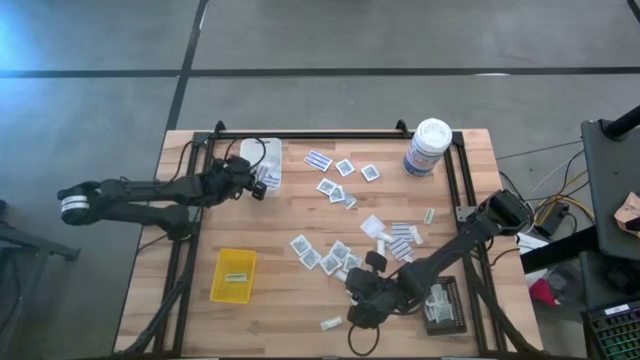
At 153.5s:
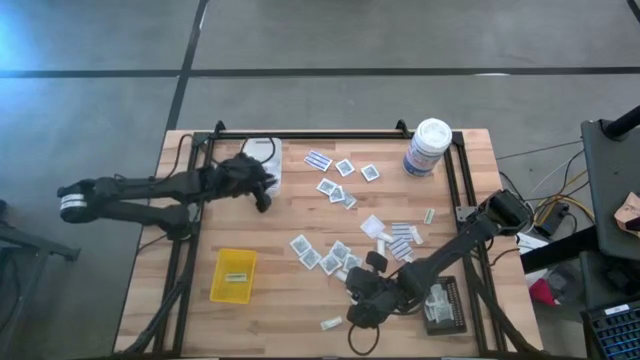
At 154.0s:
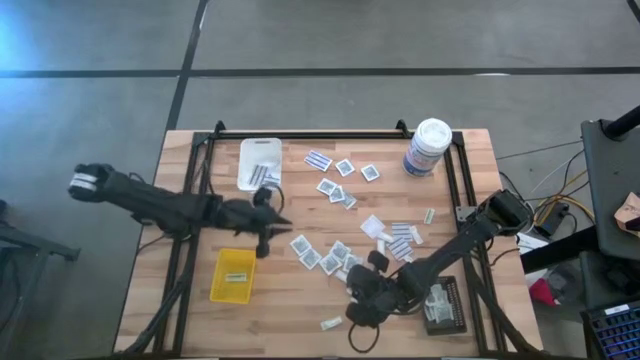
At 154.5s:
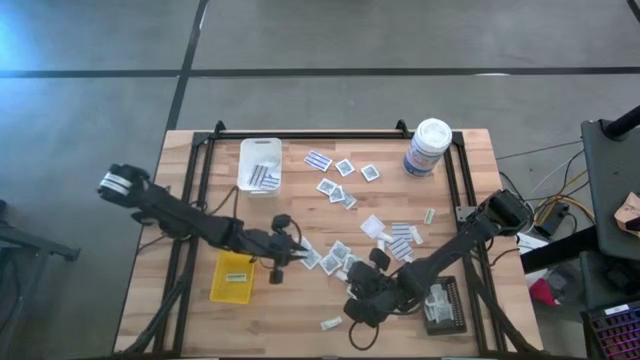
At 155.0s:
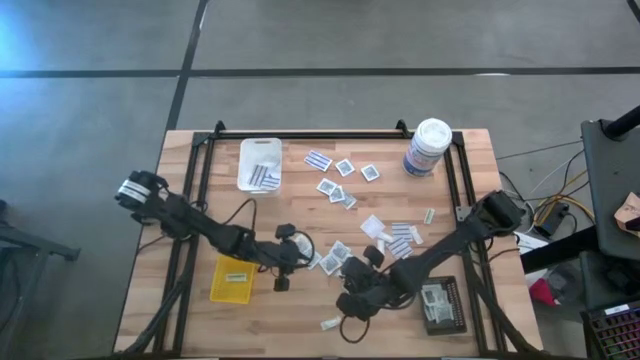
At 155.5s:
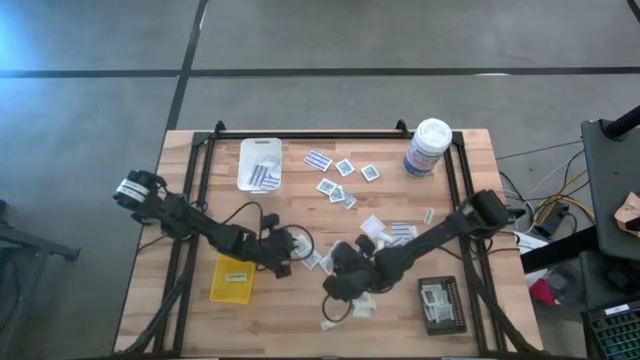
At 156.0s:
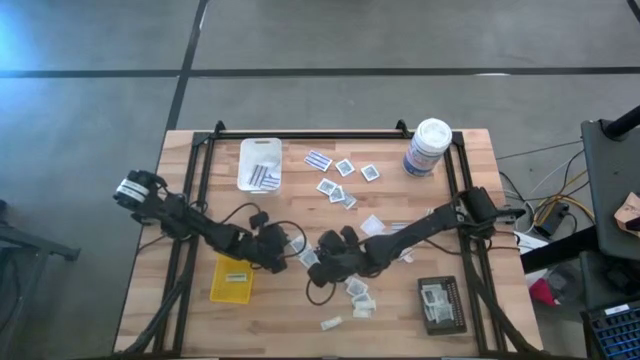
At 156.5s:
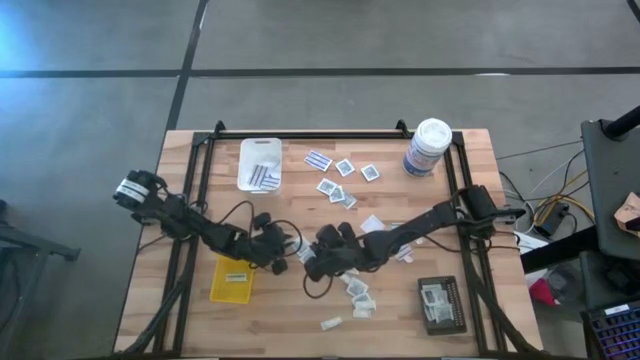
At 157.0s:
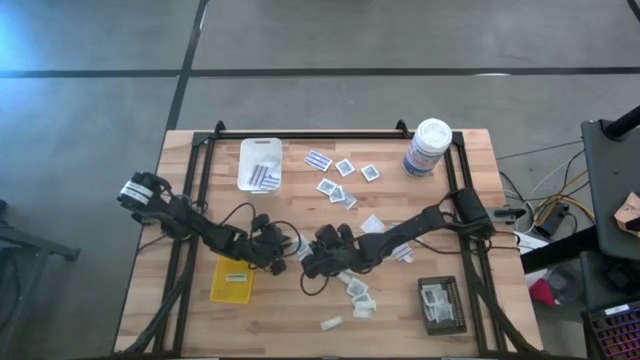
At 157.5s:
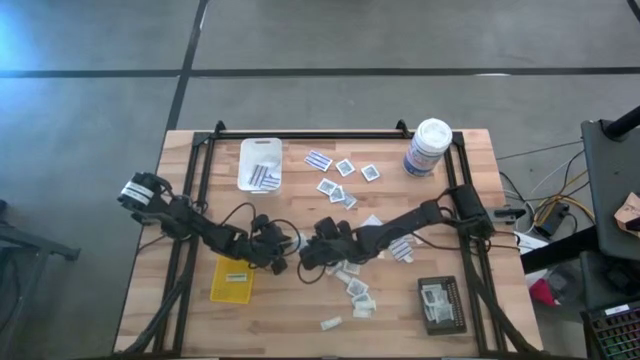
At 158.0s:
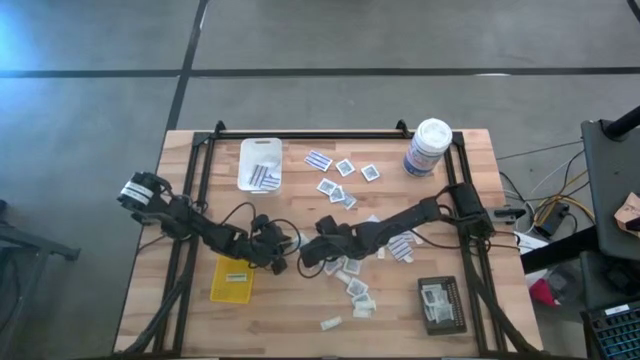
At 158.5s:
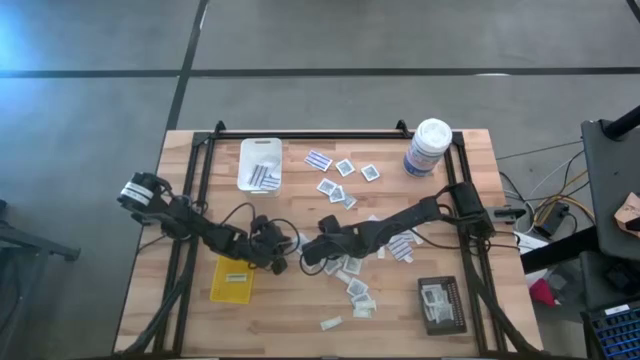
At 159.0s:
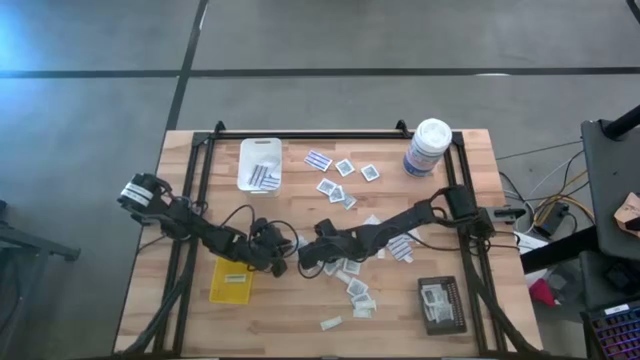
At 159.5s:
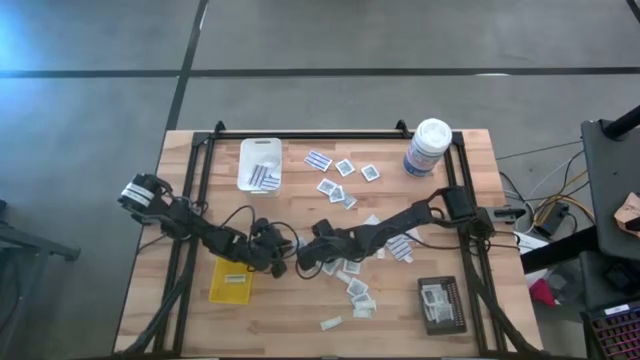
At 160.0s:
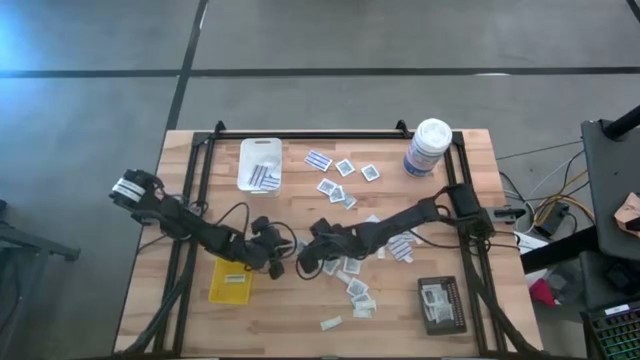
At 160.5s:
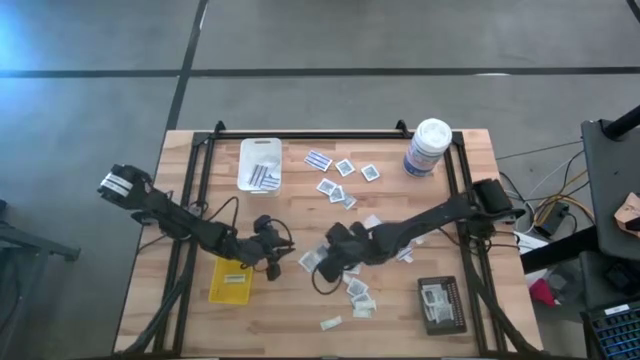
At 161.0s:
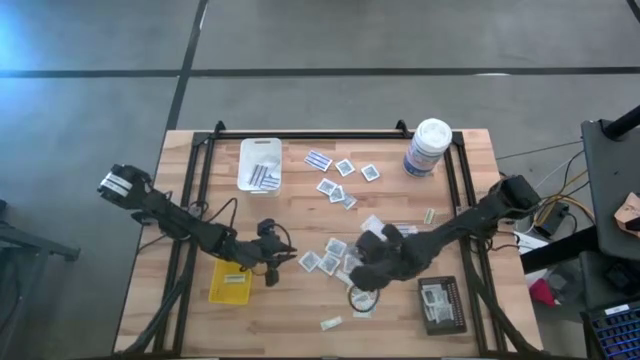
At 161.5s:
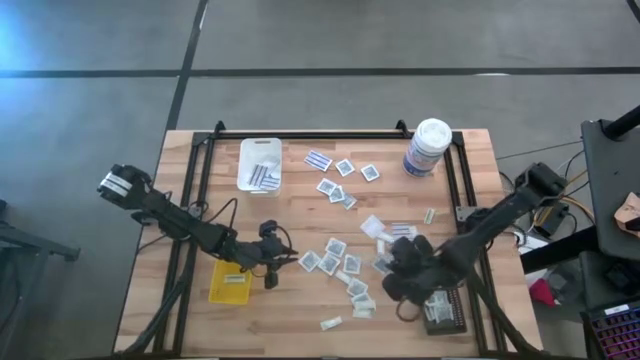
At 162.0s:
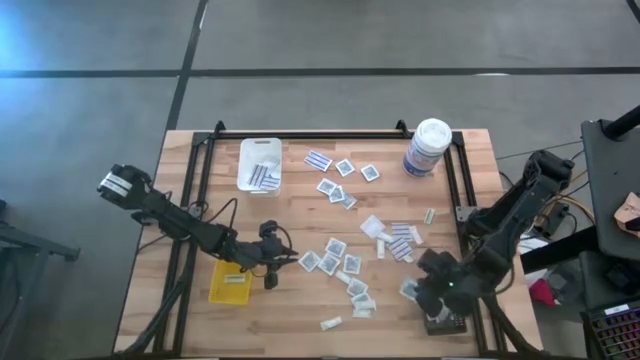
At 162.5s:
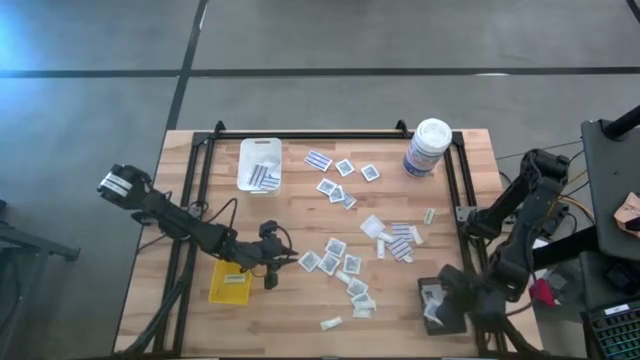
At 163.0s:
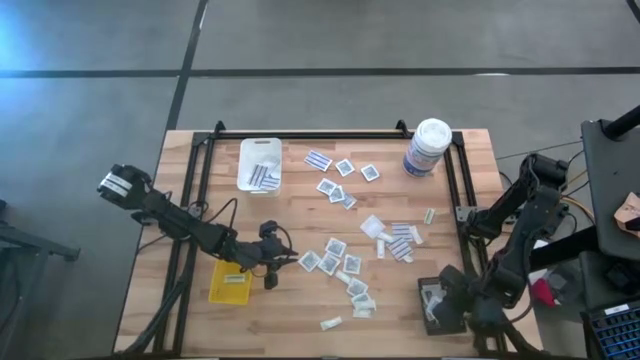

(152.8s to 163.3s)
Task: Pick & Place First Aid Supplies
Put the towelette pack into the black bin

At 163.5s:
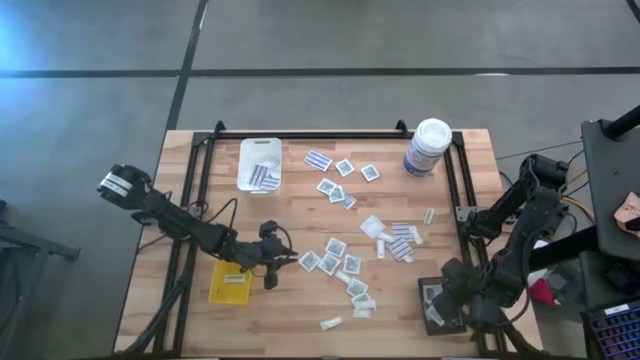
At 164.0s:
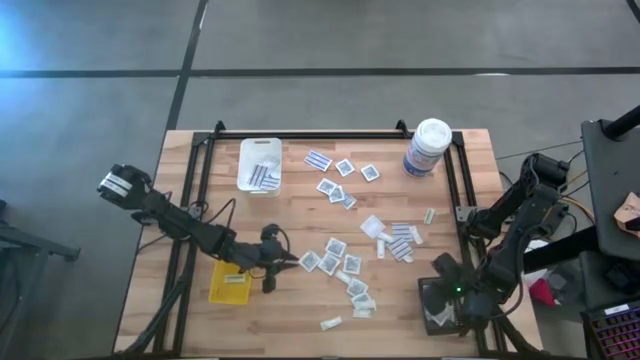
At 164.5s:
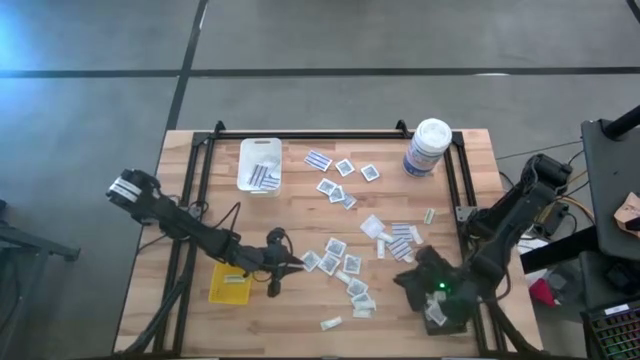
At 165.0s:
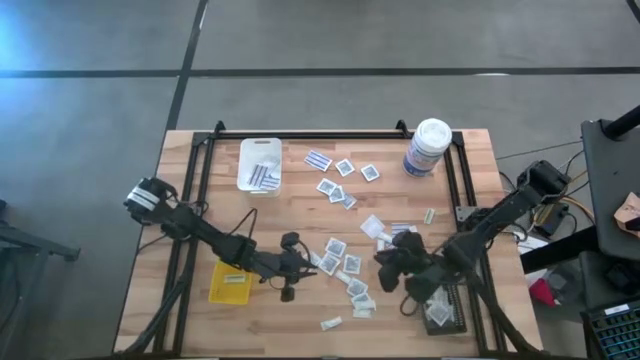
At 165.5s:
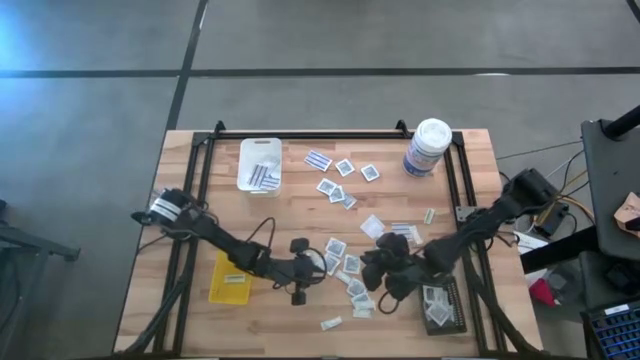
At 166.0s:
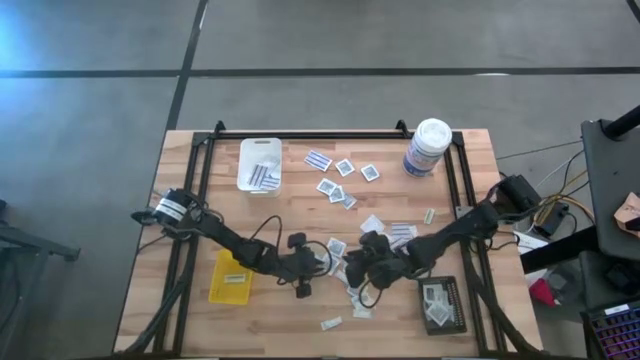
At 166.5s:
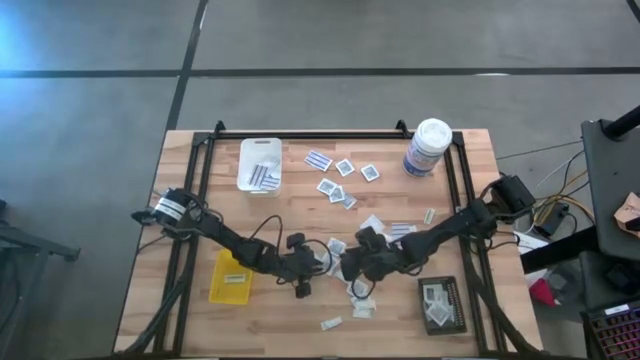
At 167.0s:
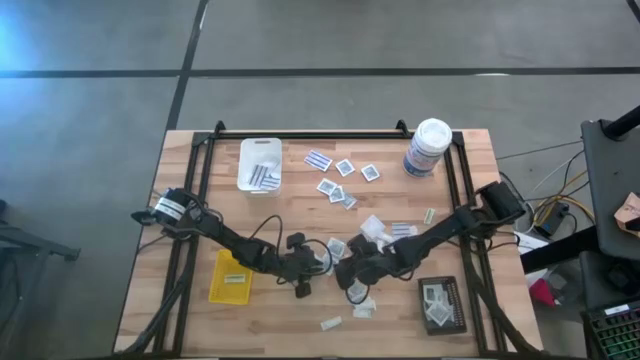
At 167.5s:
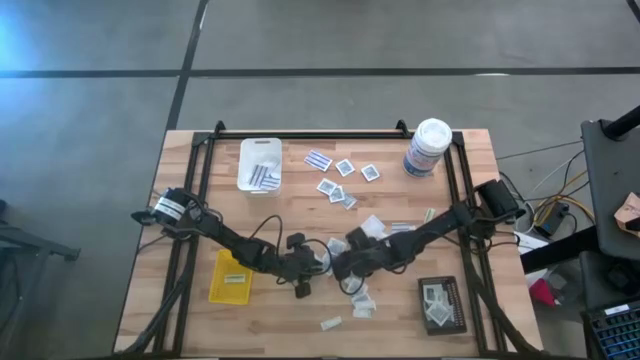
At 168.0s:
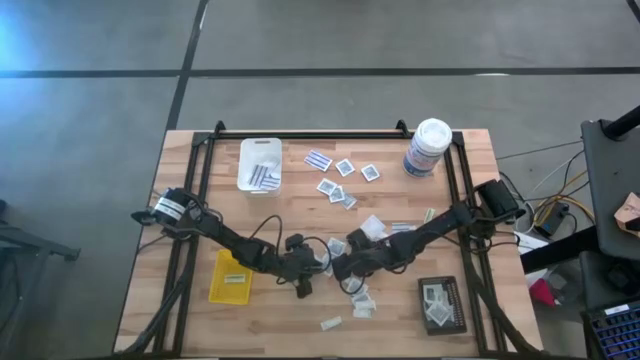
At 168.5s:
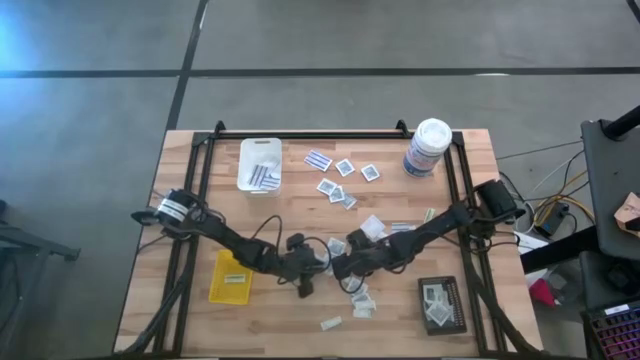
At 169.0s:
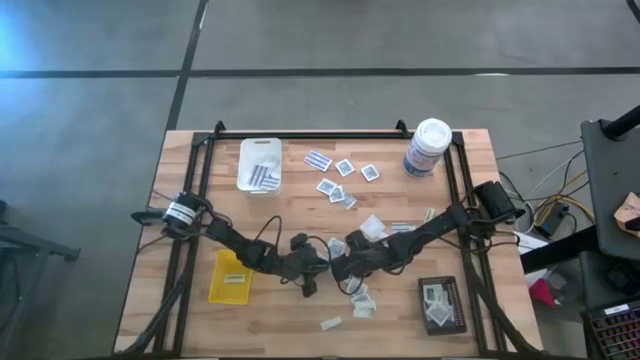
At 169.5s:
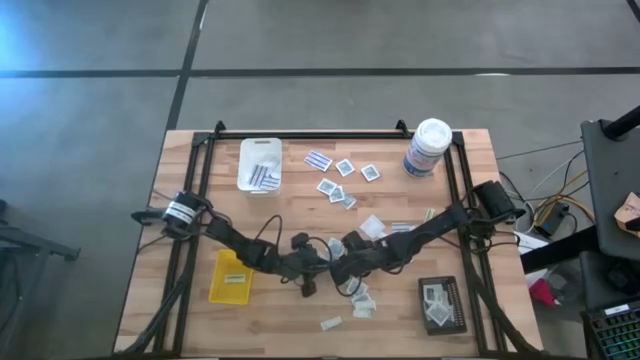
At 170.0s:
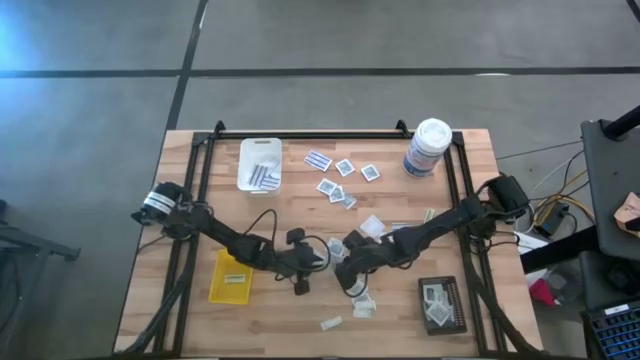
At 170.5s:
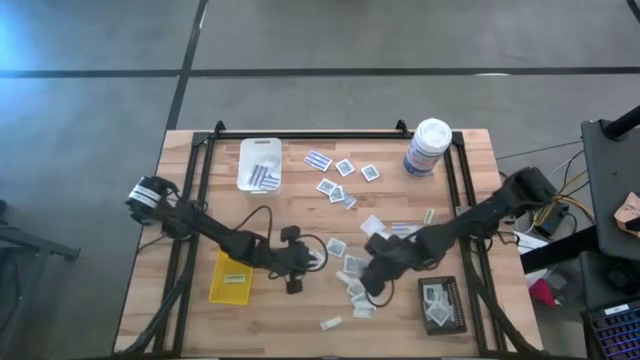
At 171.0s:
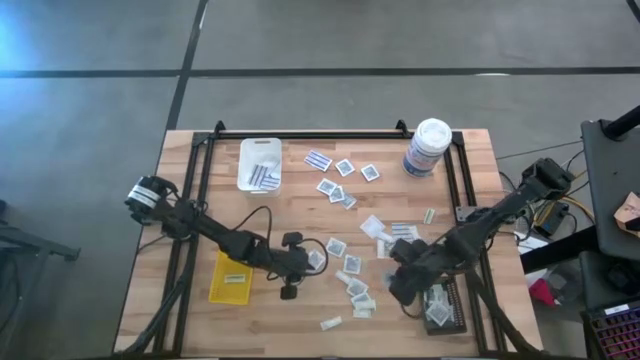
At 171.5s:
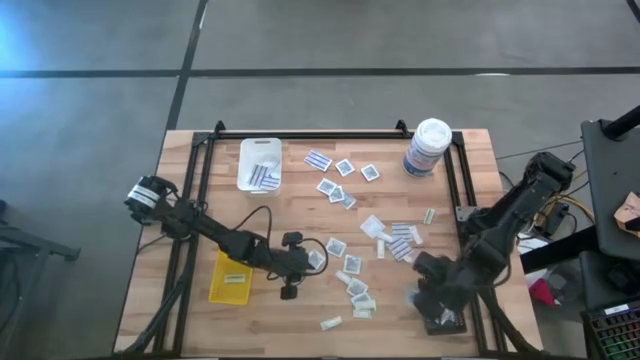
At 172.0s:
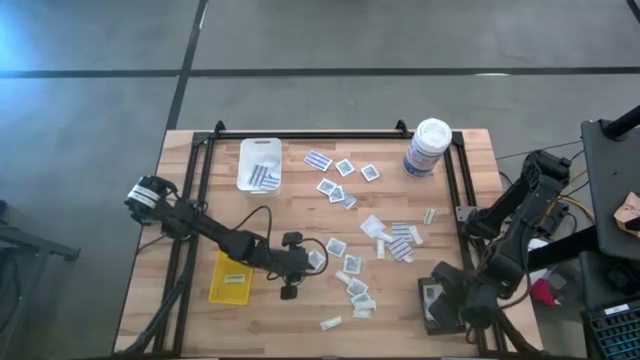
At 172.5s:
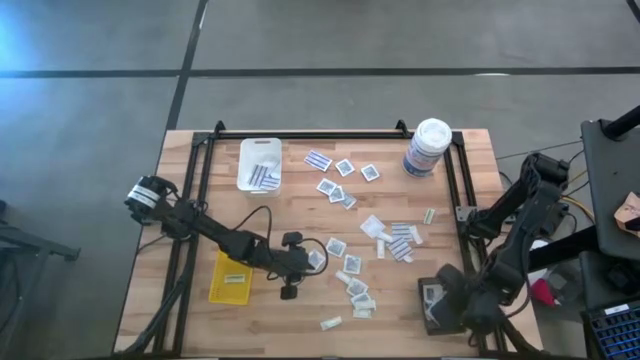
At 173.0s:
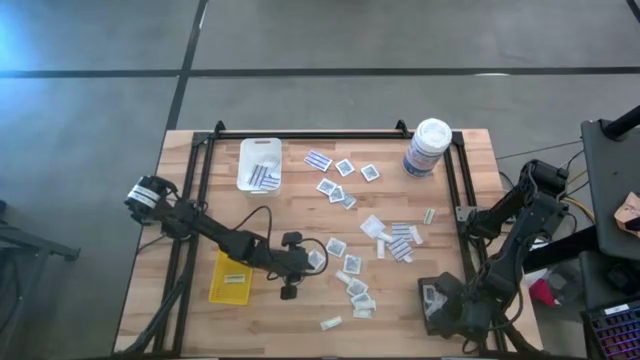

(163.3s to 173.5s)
Put the towelette pack into the black bin
